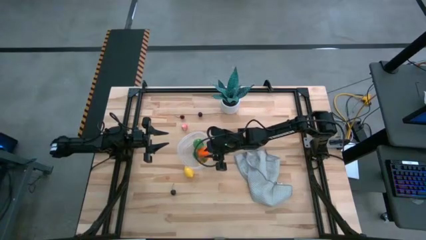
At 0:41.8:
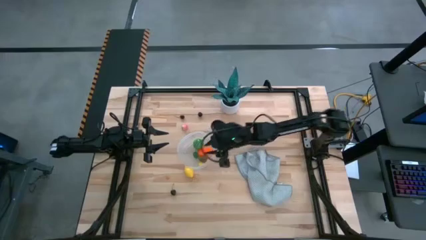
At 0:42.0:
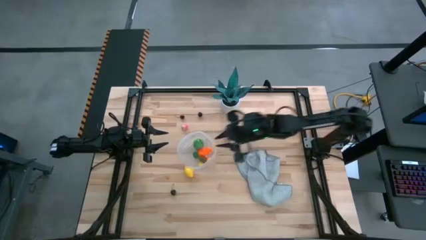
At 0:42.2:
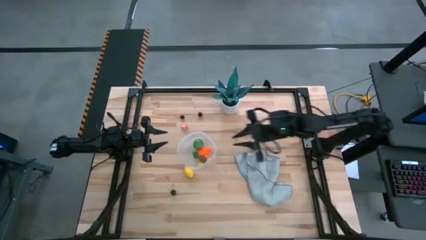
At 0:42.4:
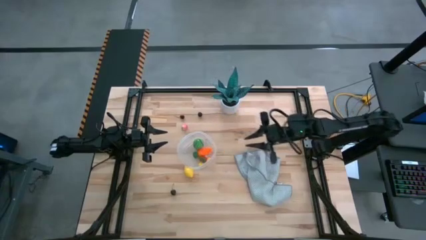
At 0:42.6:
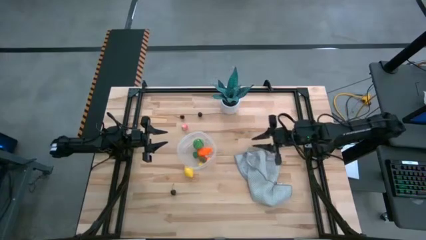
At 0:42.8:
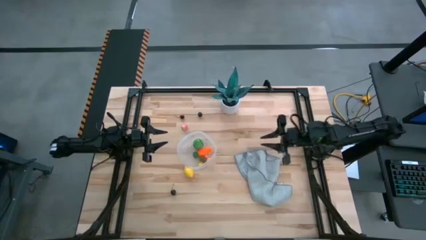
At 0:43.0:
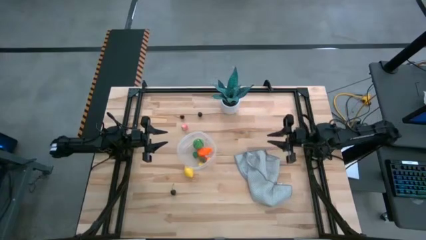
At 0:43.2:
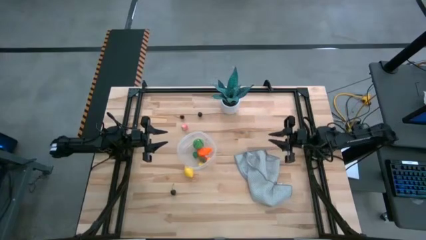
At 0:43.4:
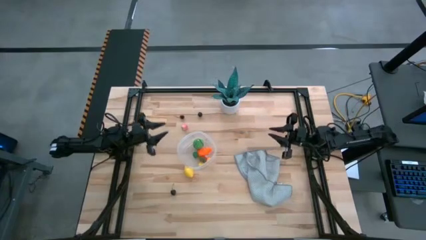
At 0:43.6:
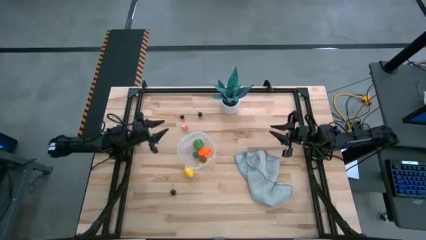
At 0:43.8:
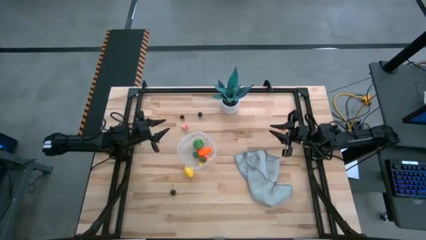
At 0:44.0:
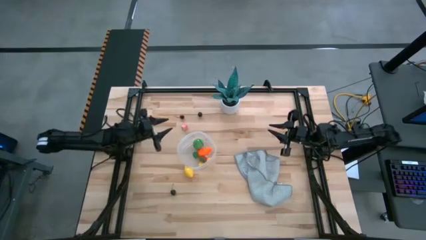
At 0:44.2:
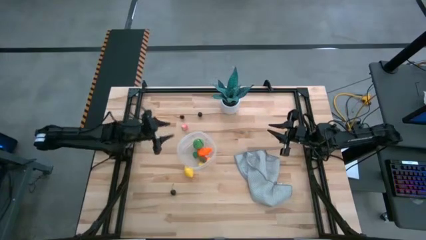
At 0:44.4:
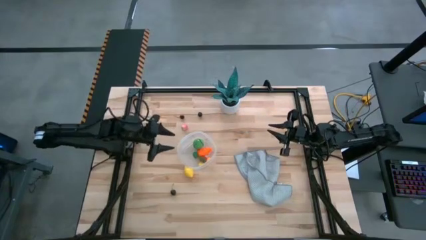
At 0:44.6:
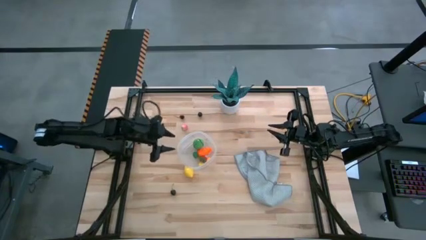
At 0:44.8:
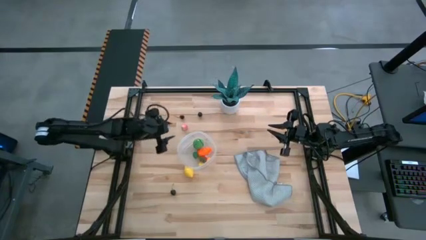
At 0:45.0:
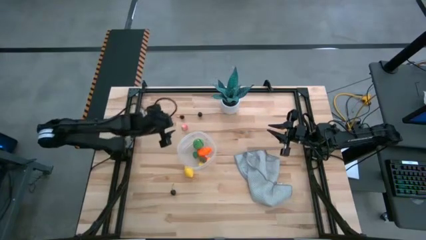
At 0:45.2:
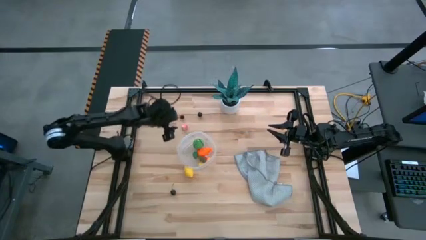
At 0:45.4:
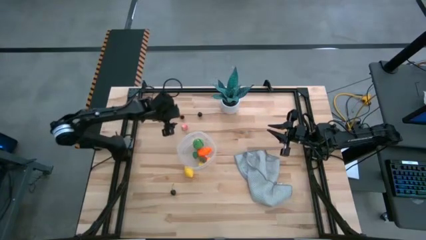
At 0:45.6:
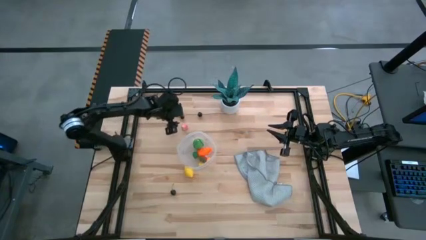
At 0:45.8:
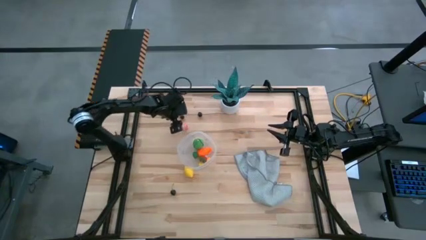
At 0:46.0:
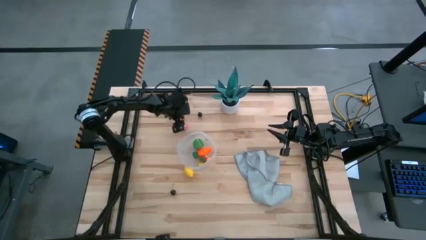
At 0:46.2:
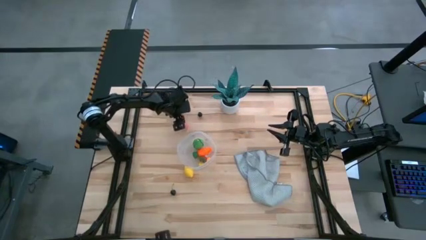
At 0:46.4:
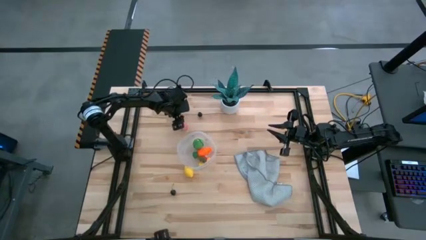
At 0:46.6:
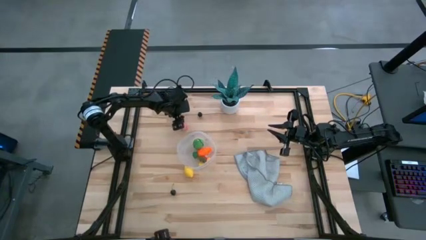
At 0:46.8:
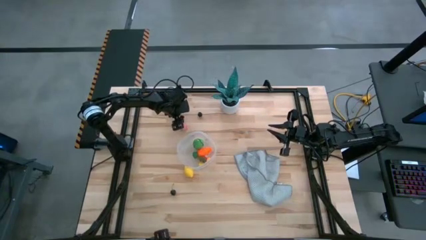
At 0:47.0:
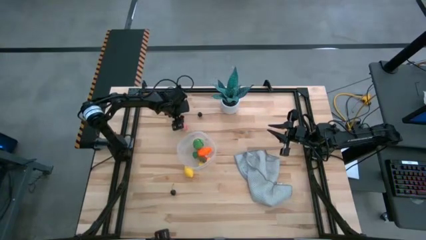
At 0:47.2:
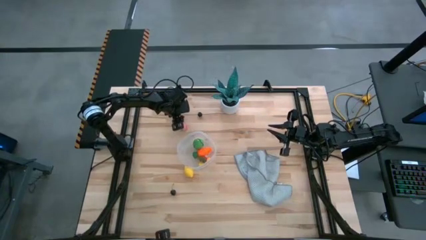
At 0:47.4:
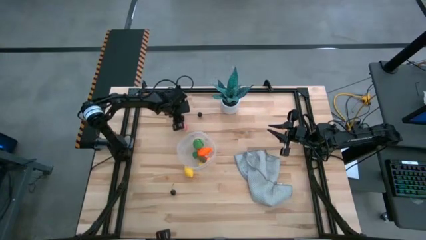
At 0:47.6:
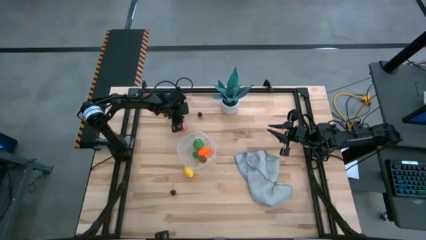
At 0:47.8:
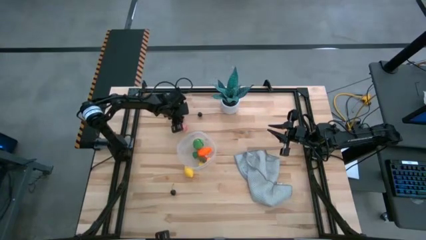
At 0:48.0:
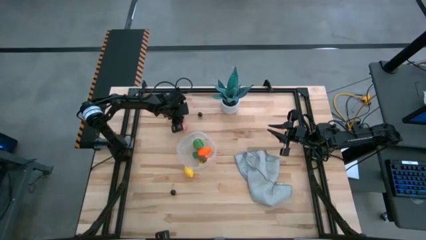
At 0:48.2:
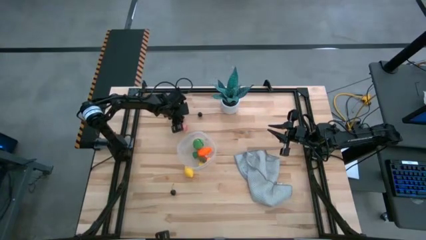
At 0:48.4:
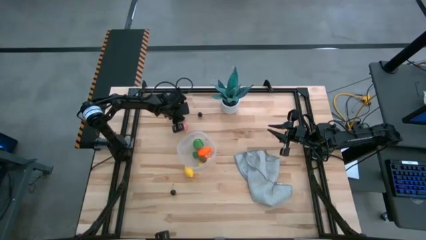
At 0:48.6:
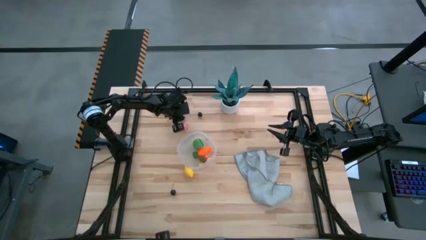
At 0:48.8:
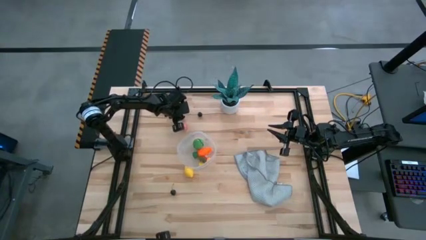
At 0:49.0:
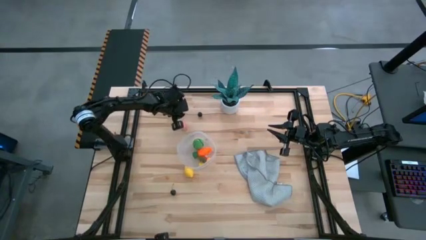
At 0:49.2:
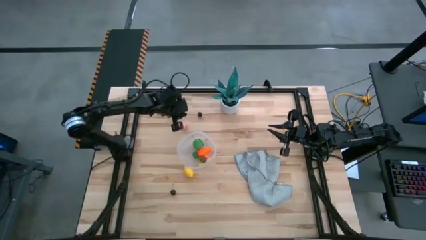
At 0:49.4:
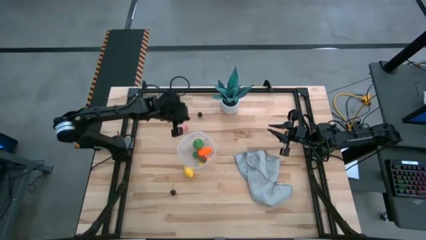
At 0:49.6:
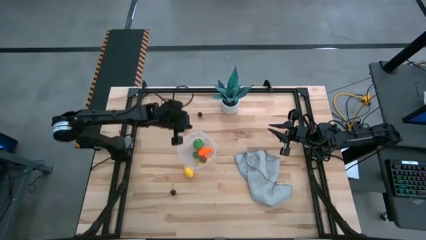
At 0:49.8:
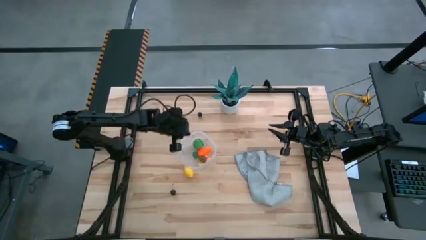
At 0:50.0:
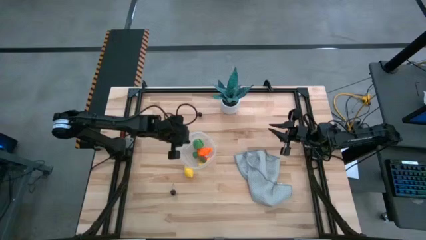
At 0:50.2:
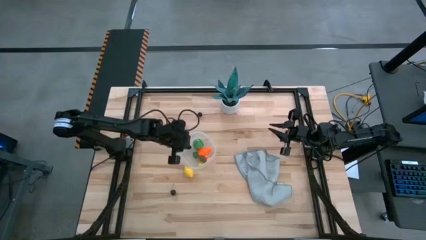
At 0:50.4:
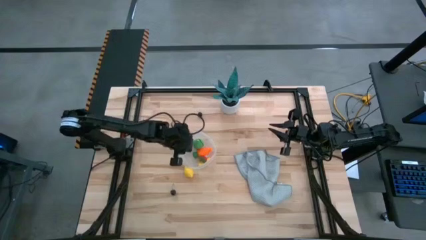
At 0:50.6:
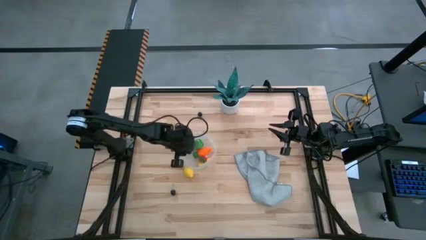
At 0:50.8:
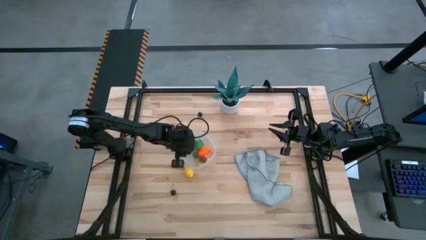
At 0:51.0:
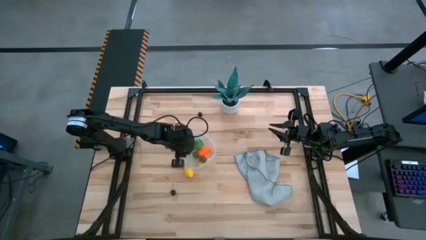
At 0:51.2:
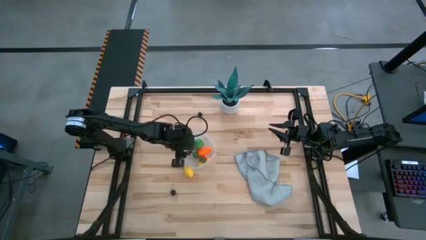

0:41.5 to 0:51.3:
Task: Pick and placing Produce into tupperware
Put the red cherry into the transparent bin

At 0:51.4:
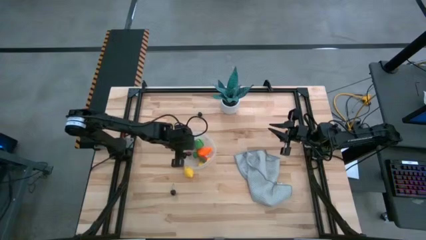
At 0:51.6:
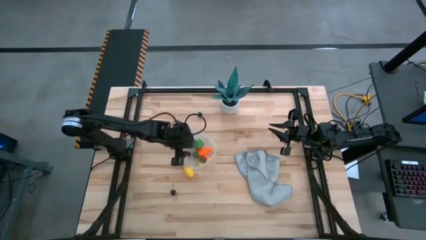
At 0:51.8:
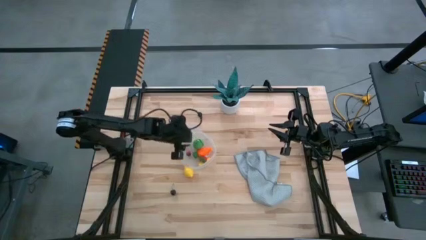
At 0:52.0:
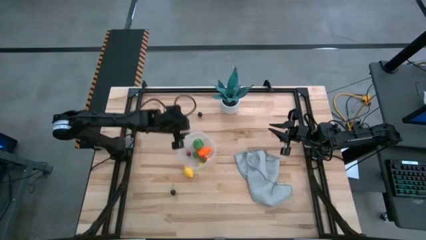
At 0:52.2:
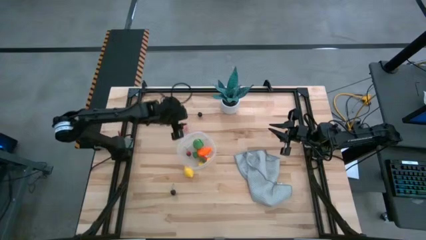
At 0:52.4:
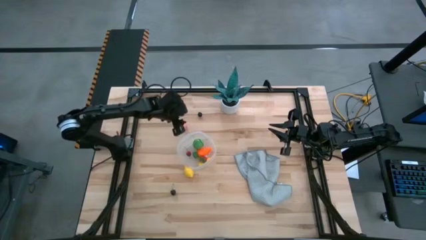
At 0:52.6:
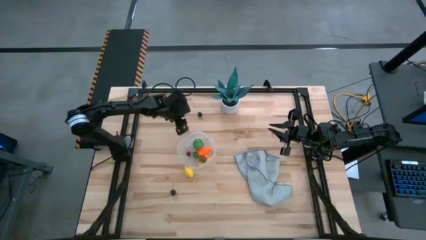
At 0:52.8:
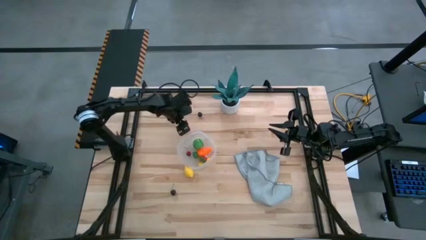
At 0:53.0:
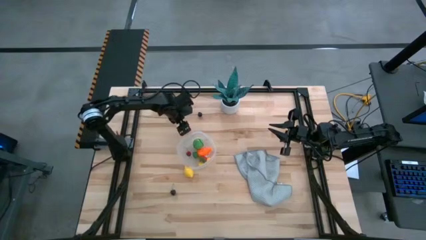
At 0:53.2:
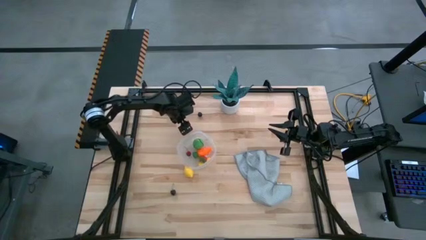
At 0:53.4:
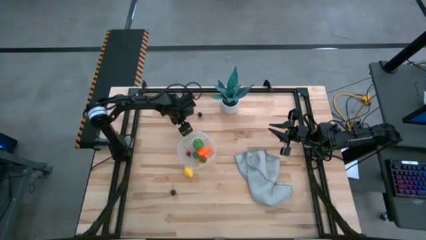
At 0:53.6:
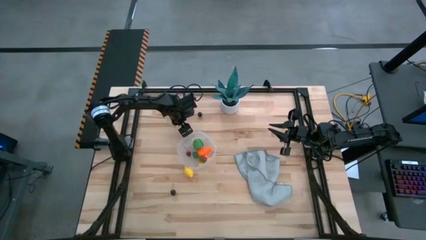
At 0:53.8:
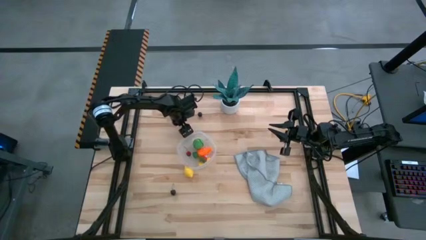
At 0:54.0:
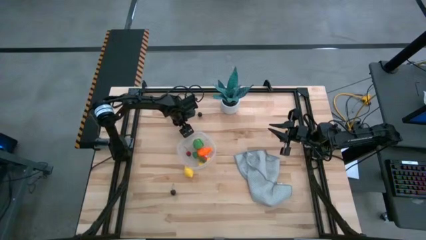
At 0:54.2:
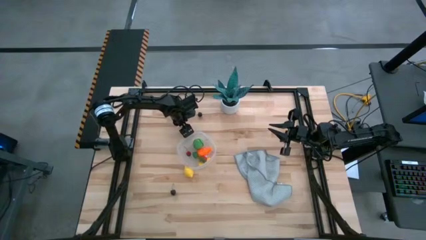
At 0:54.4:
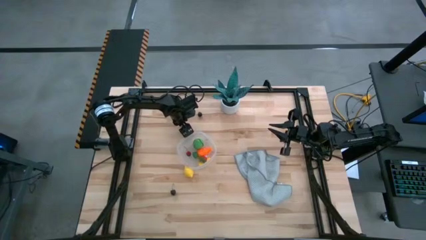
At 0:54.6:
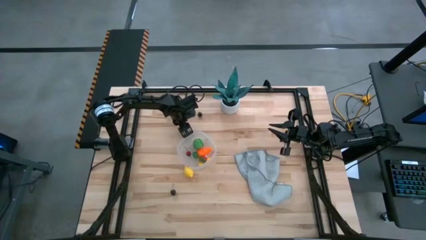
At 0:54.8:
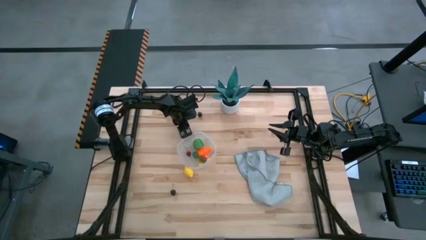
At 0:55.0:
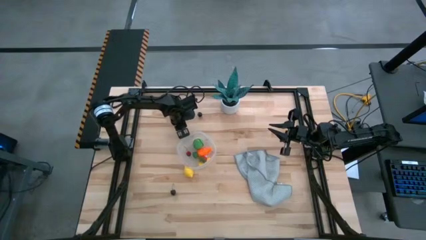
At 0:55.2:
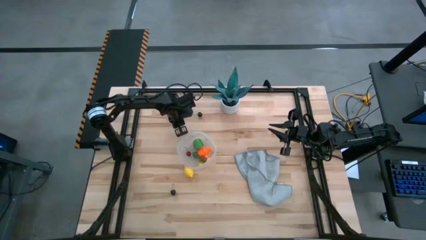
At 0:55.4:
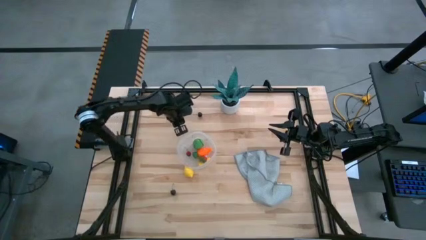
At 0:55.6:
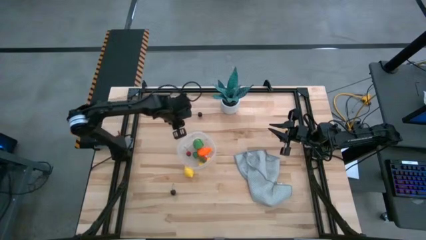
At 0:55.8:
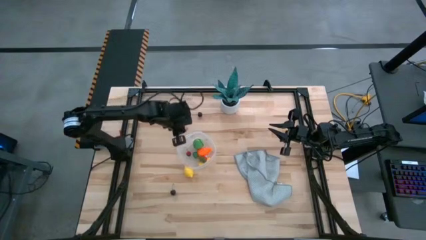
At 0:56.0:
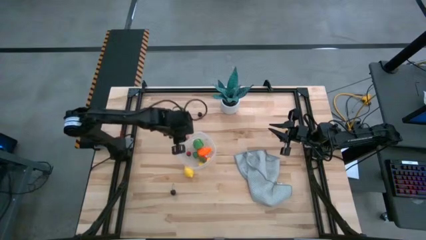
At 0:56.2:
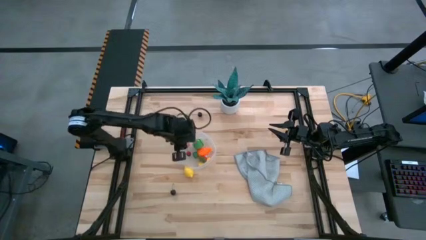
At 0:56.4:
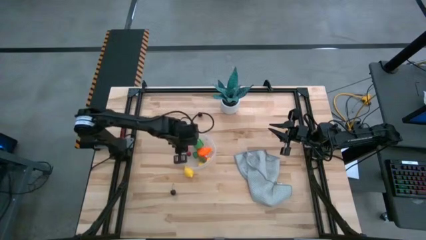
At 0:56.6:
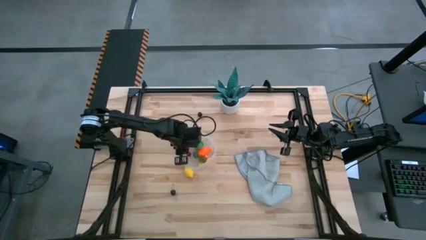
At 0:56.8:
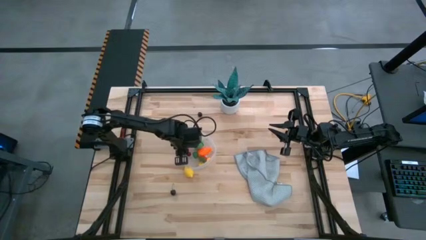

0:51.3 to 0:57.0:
Put the peach into the transparent bin

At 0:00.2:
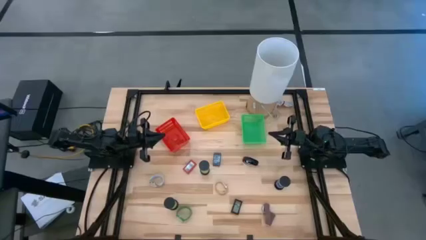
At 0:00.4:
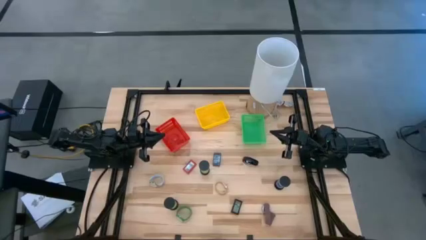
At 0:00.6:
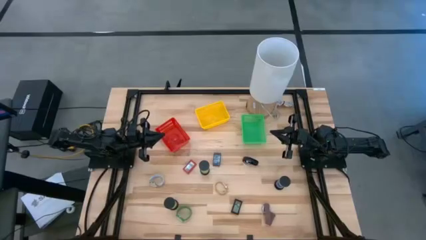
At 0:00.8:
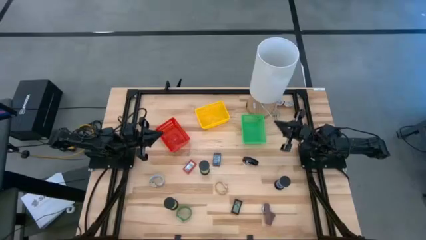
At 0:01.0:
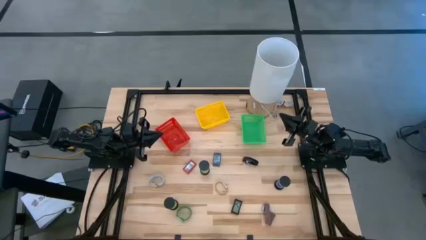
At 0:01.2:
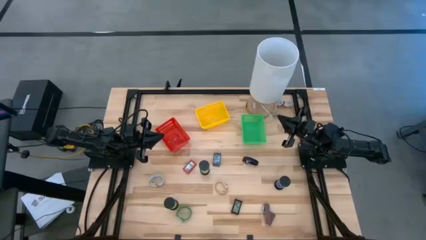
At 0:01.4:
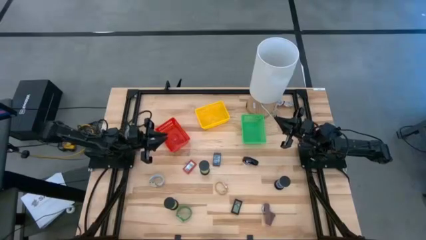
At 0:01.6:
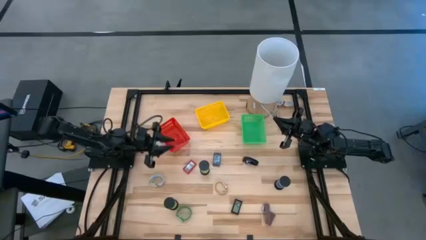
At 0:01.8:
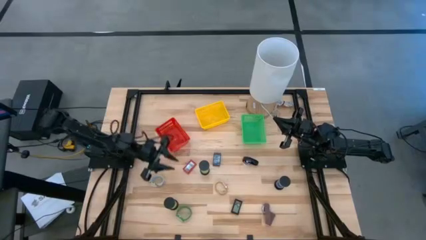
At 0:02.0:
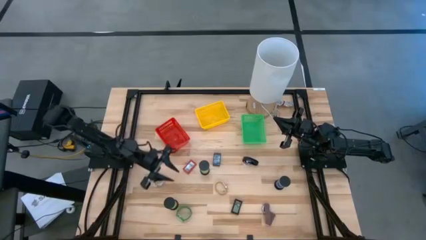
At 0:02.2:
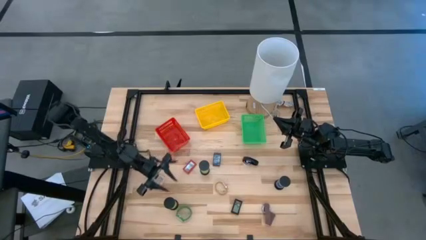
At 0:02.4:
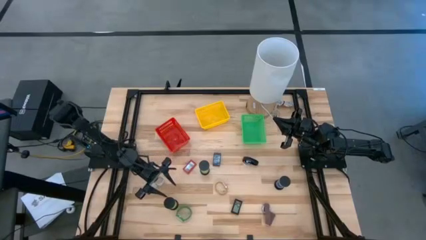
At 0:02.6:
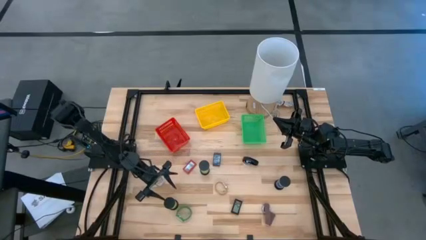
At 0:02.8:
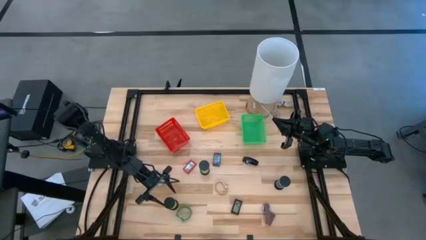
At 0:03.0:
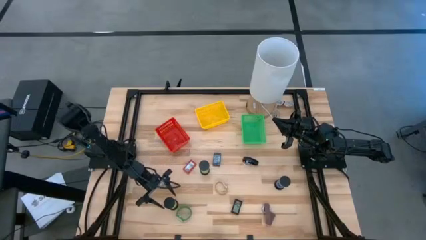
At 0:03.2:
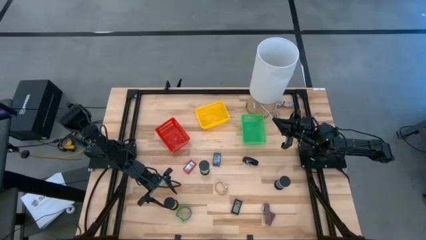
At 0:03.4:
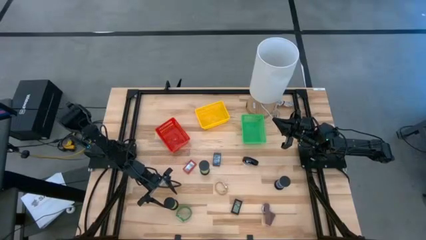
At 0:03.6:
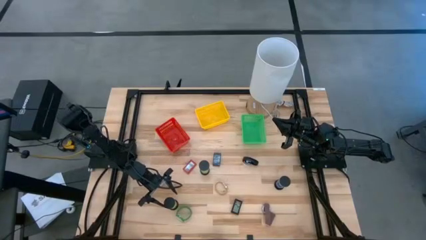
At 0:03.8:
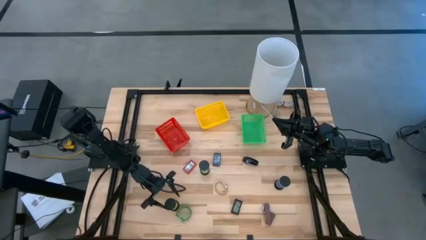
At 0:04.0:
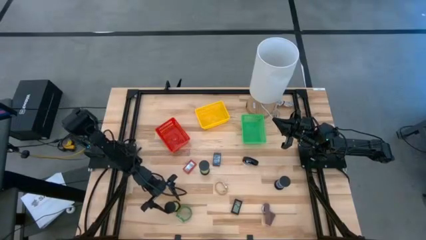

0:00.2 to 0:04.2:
Task: Pick & Place Office items
Put the left green hourglass into the red basket
